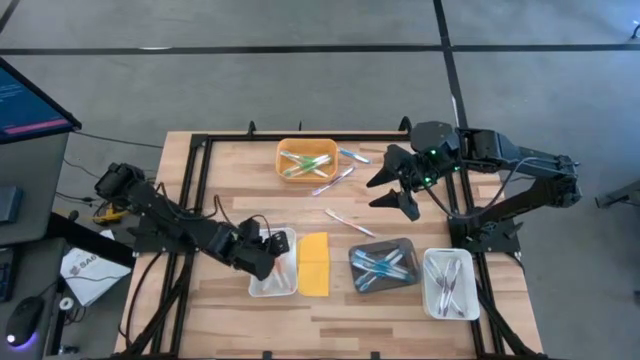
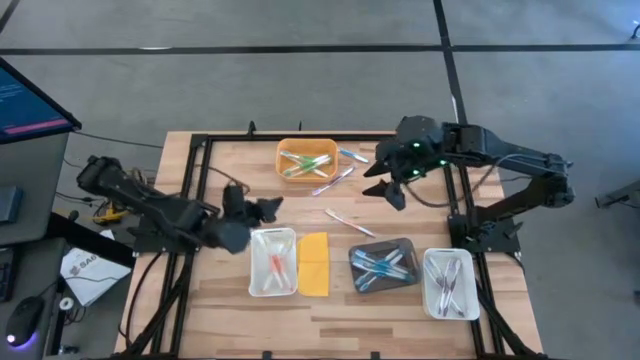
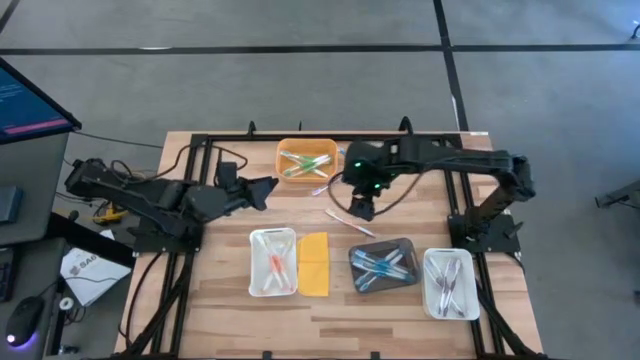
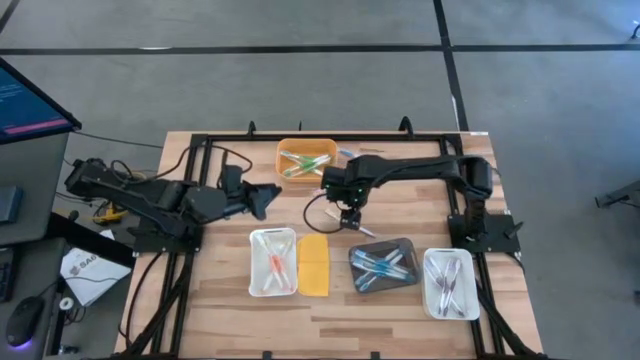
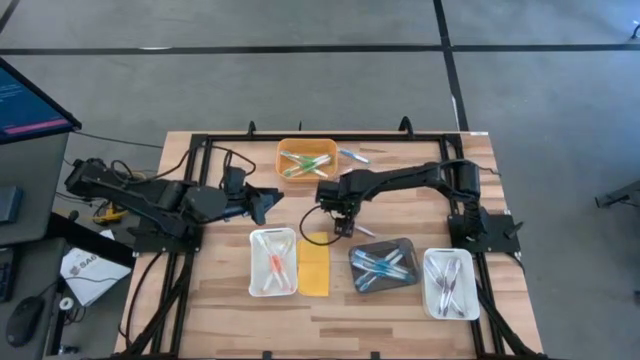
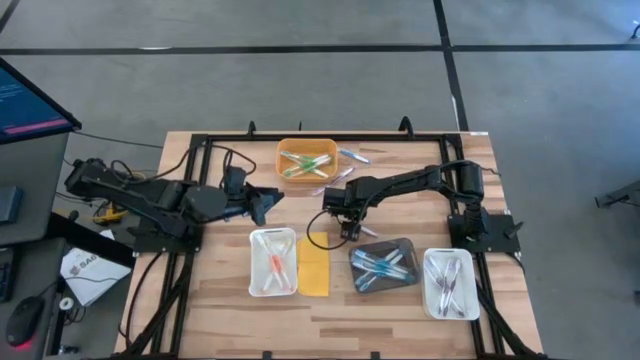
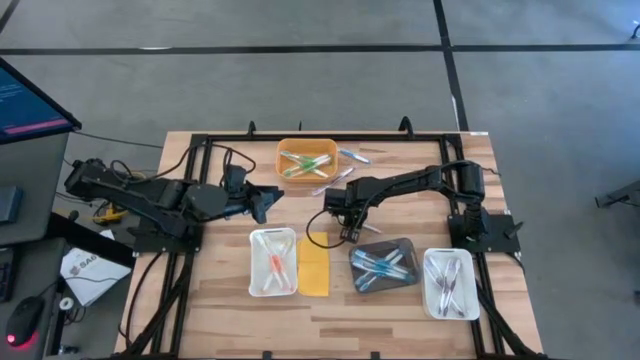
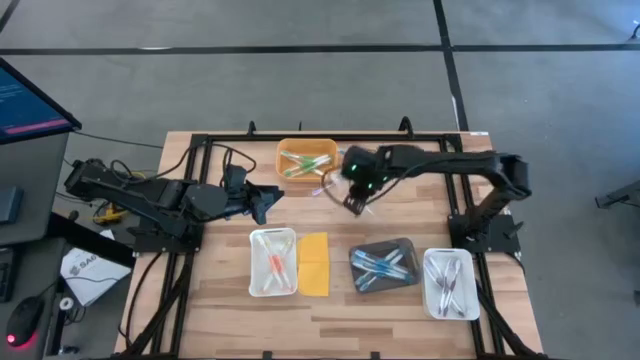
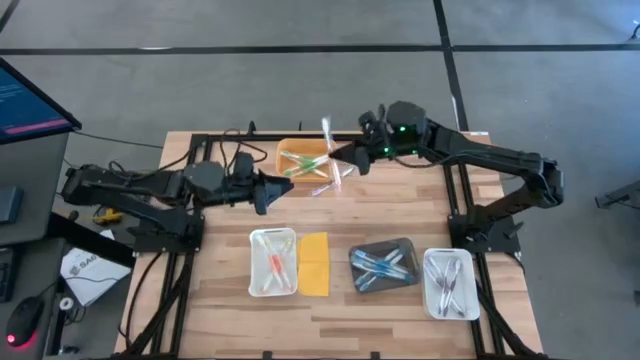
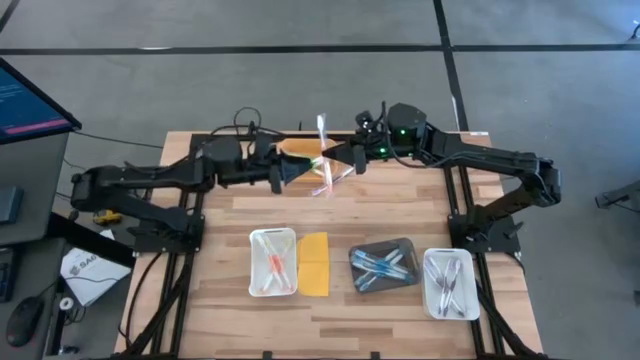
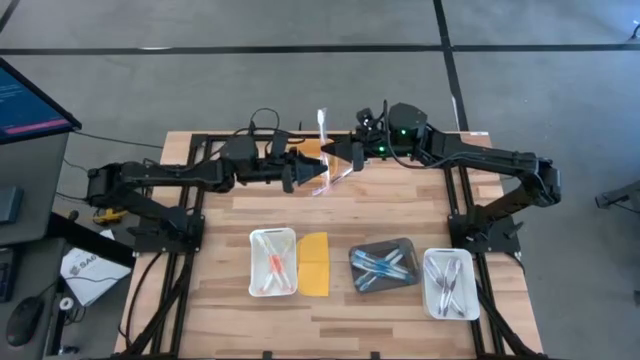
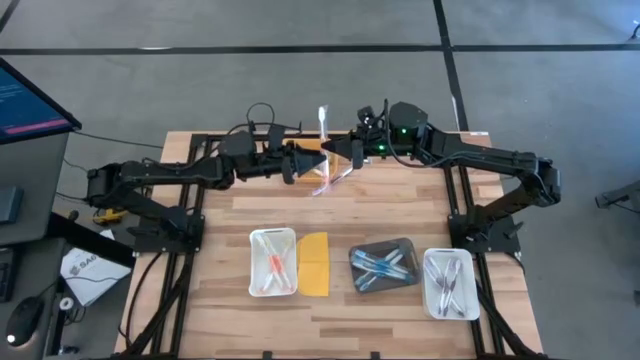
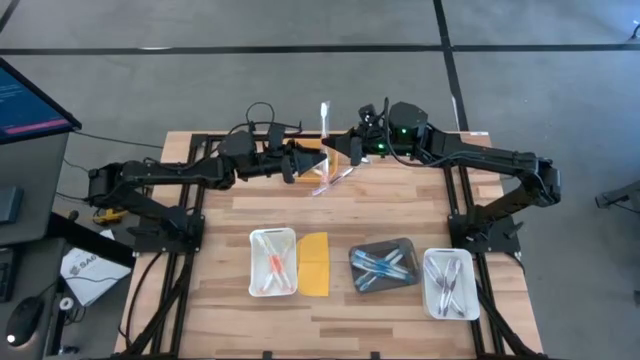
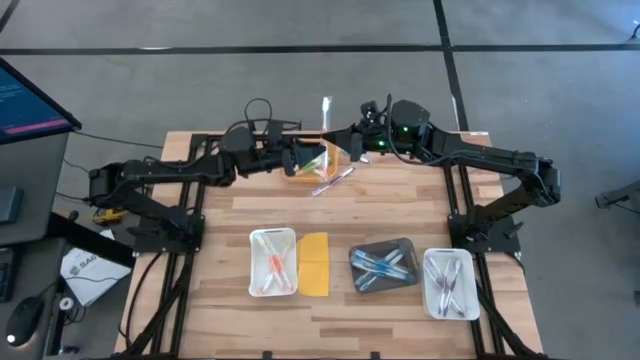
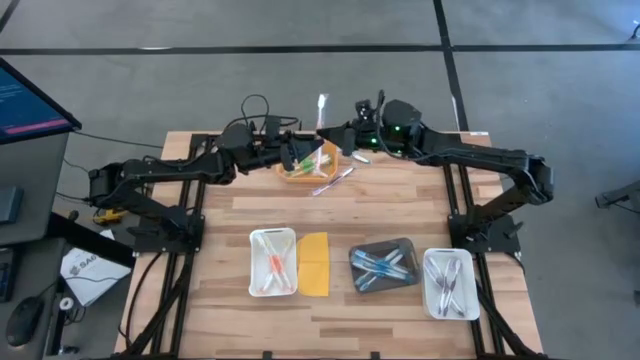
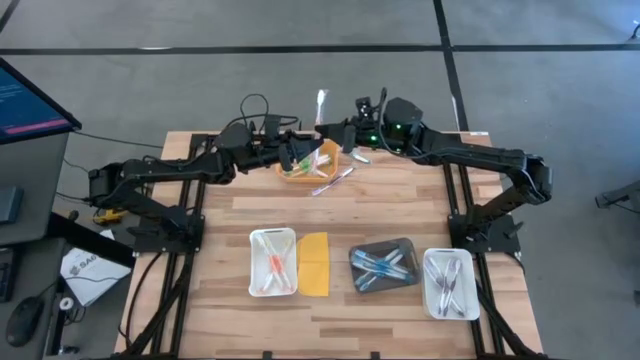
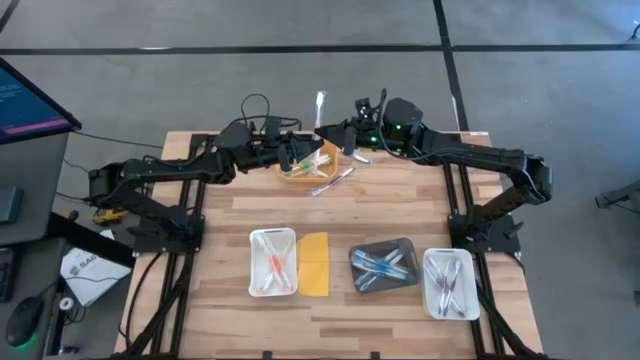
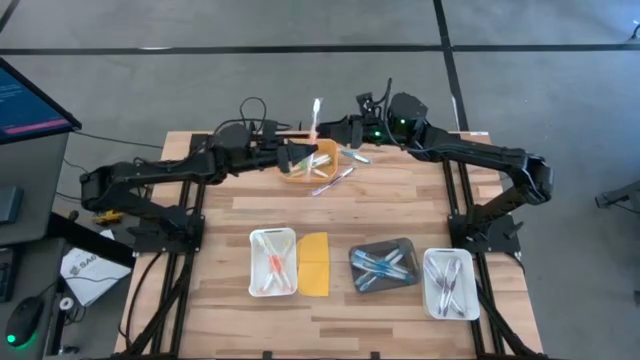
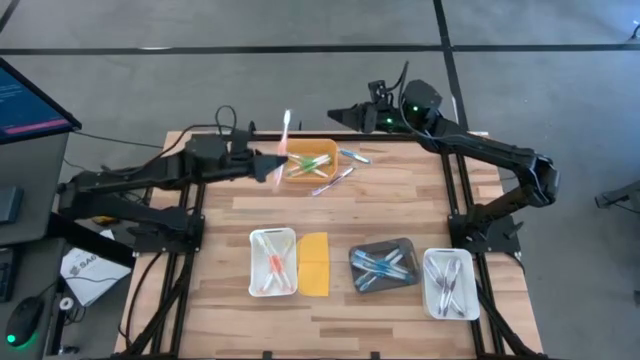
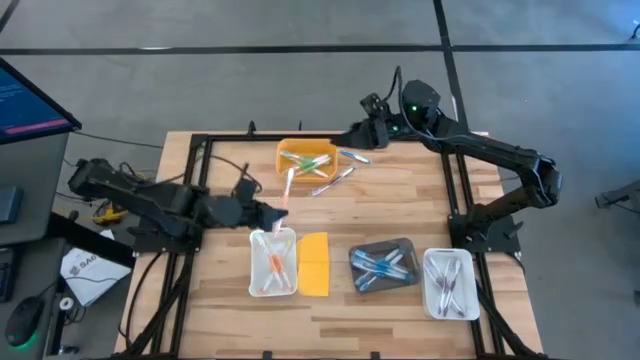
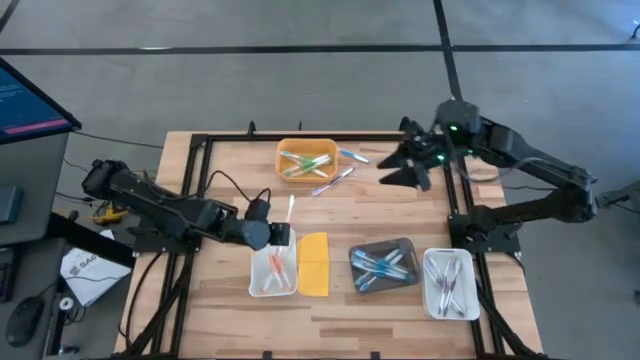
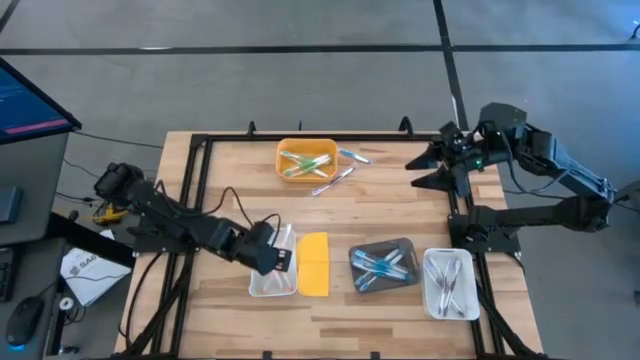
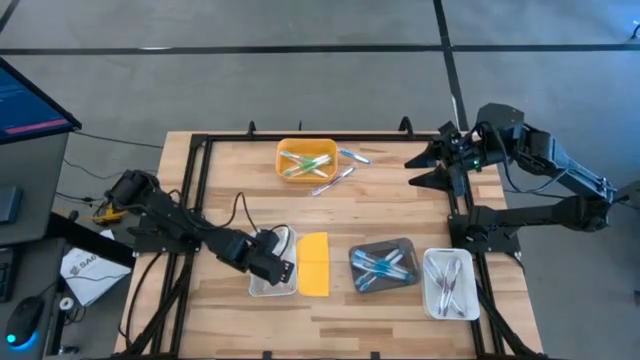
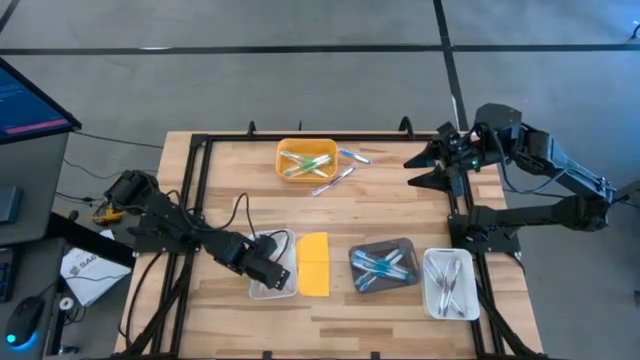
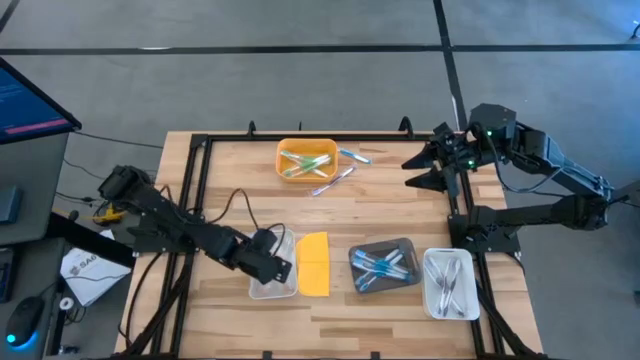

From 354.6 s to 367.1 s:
Task: Pick & Place Toothbrushes
Put the orange toothbrush into the left white bin

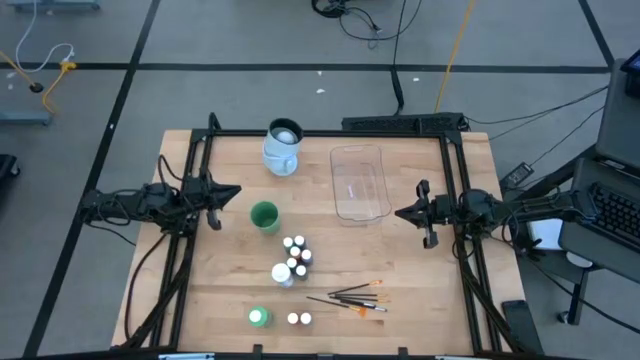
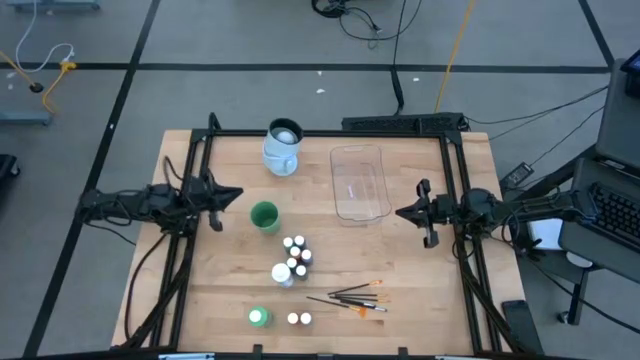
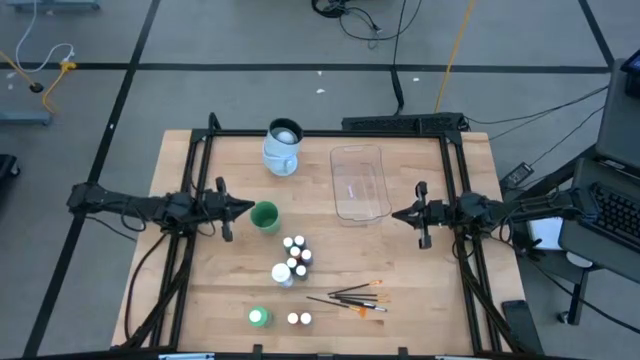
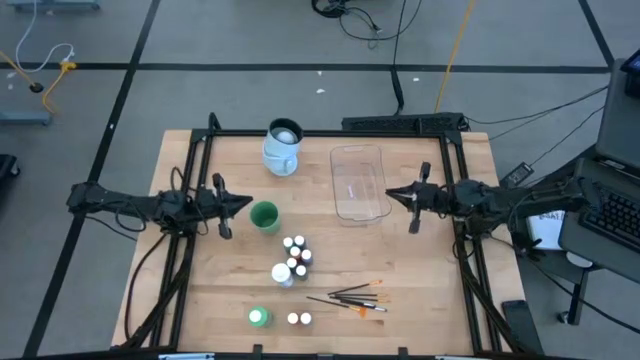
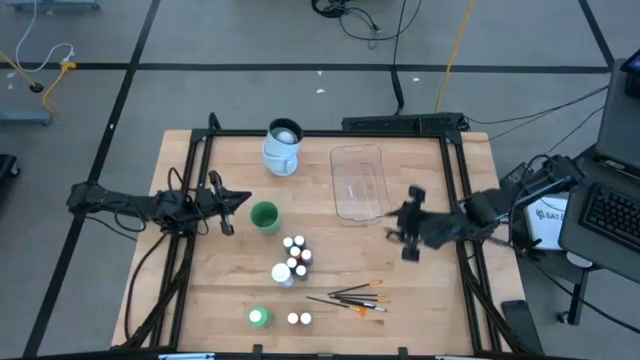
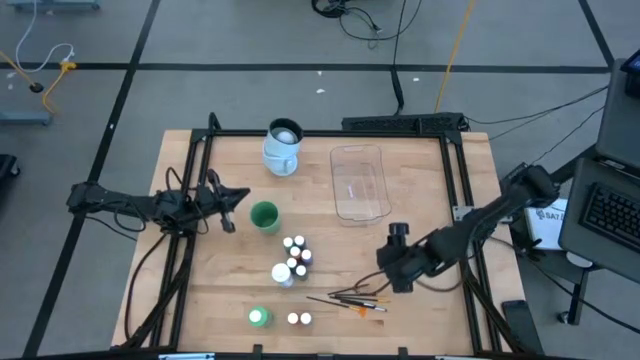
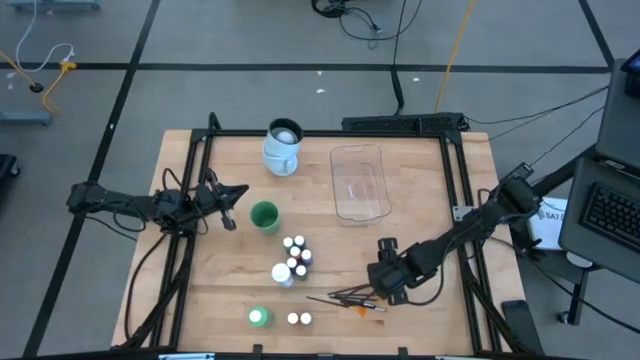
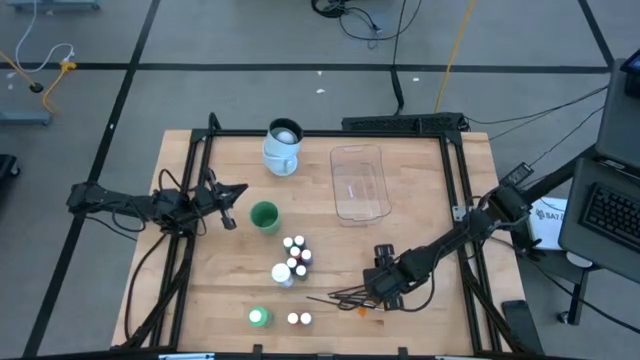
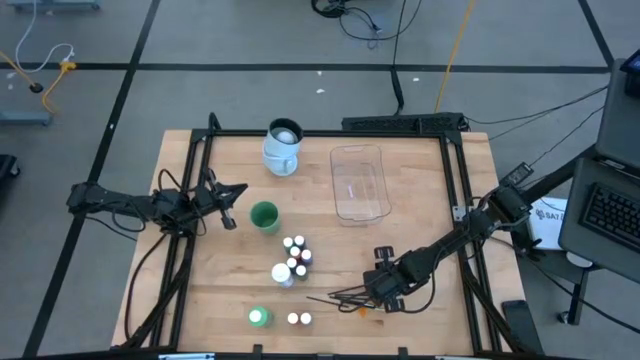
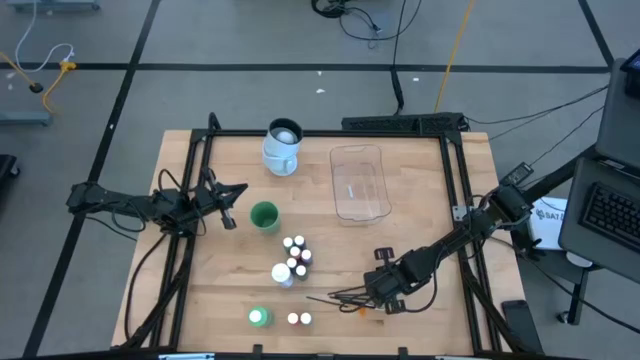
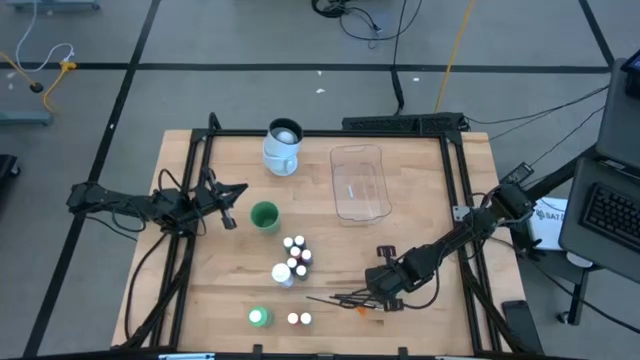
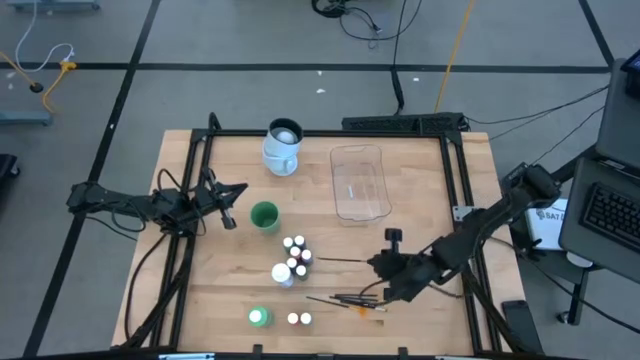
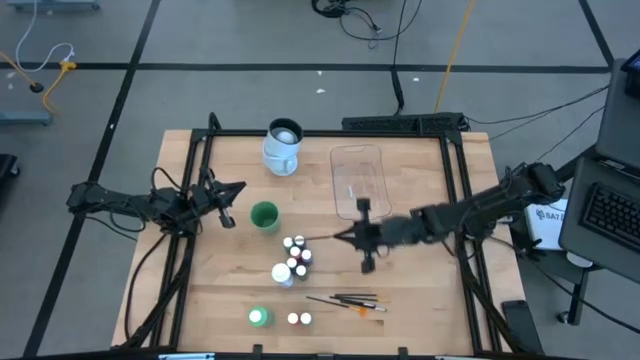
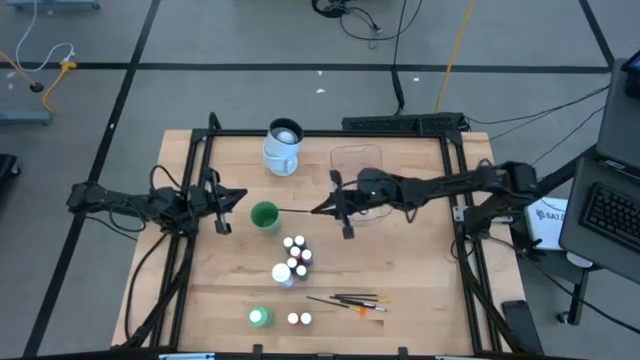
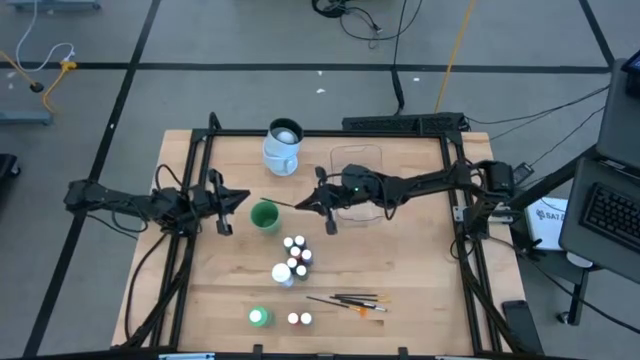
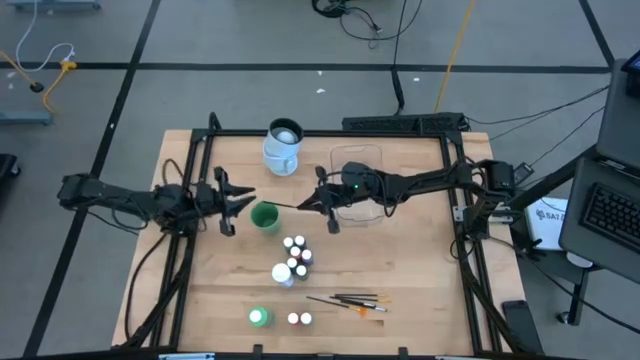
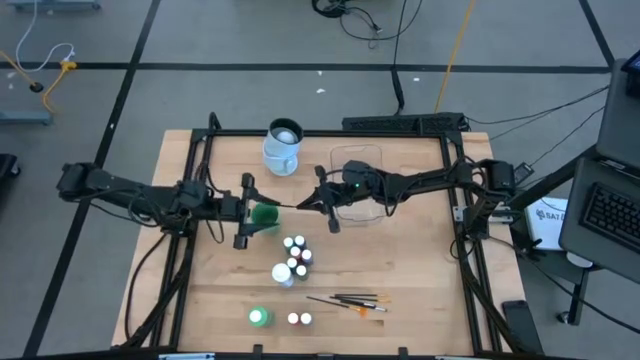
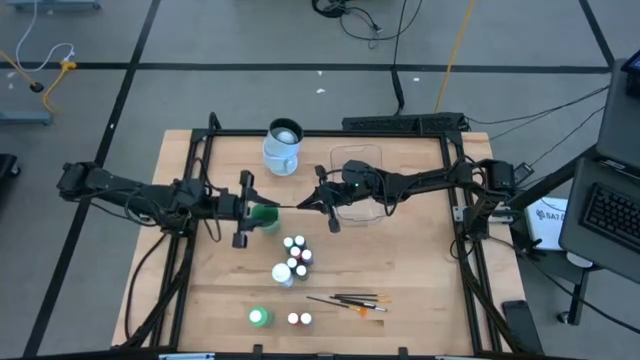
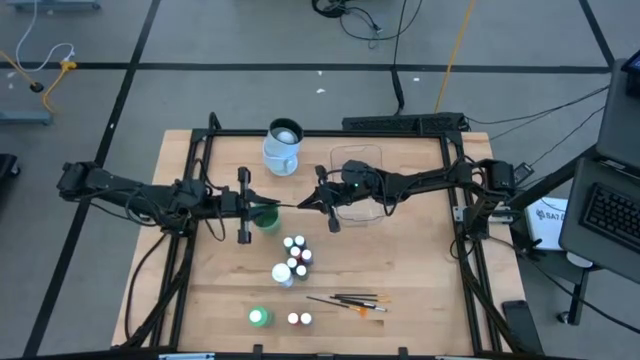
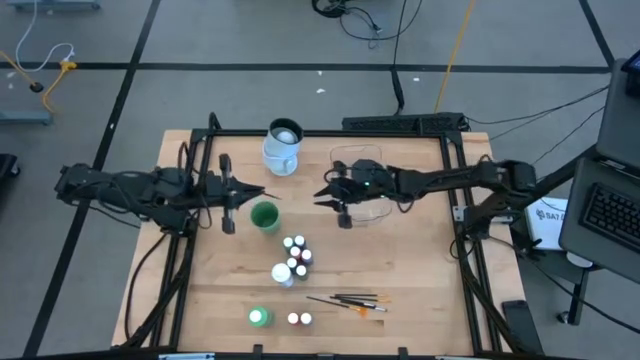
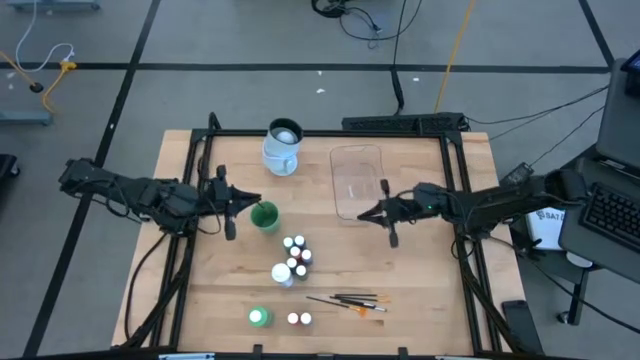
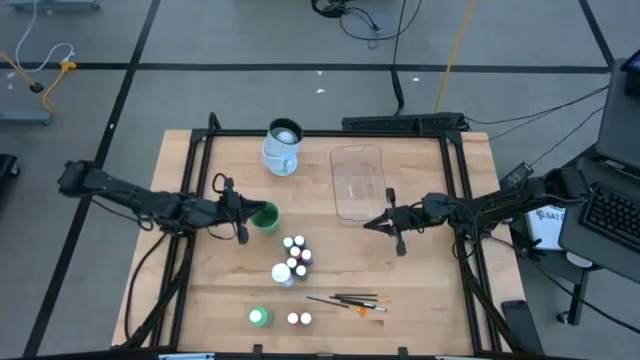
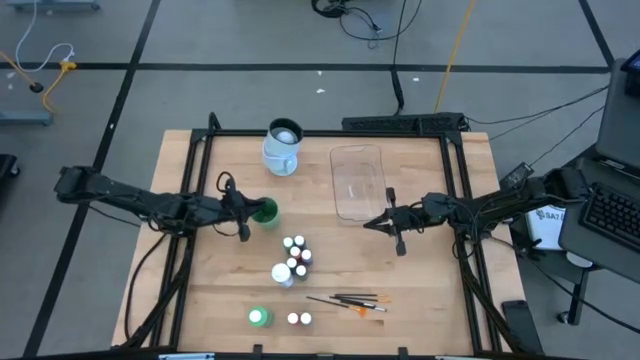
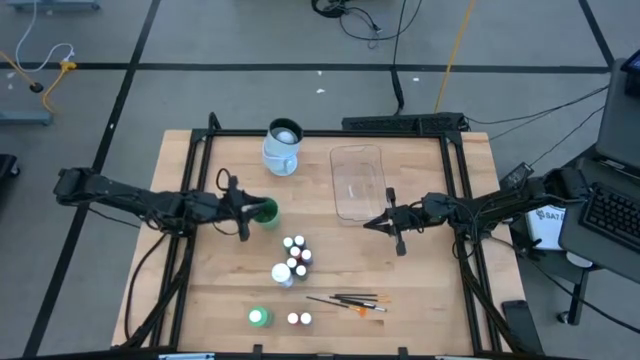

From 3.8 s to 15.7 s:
Task: Pick & Place Paint Supplies
Put the gold paintbrush into the green cup
